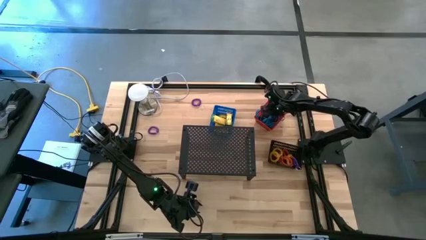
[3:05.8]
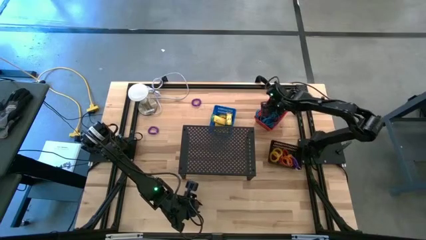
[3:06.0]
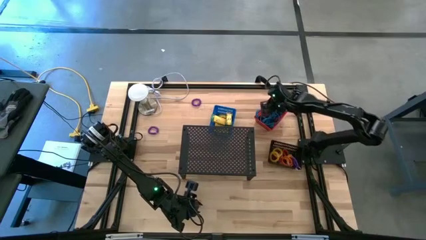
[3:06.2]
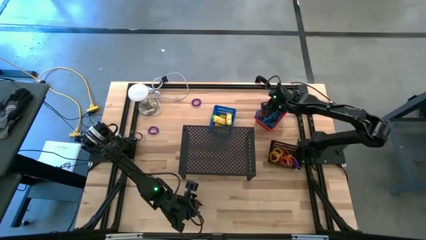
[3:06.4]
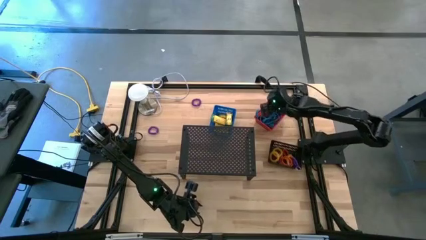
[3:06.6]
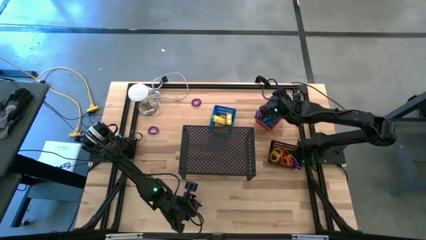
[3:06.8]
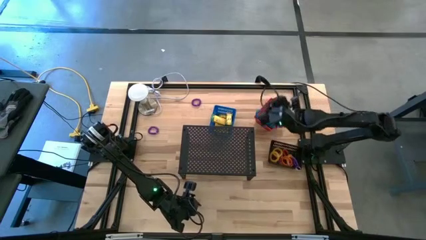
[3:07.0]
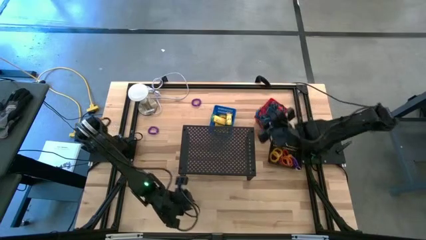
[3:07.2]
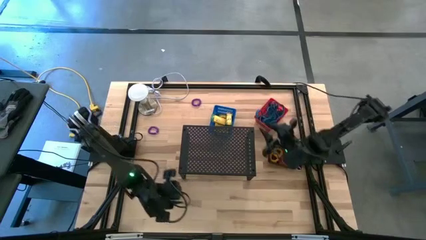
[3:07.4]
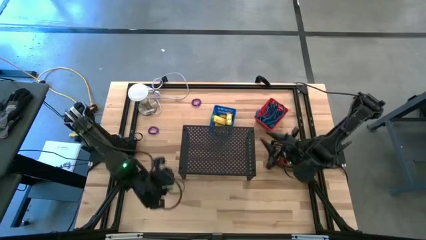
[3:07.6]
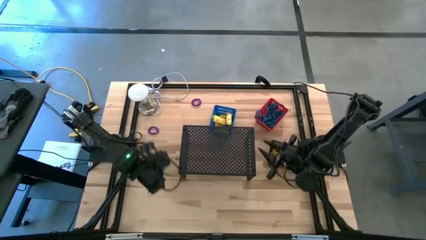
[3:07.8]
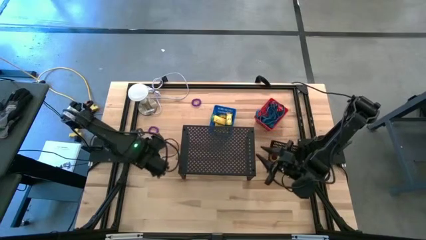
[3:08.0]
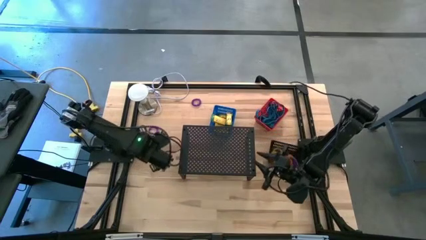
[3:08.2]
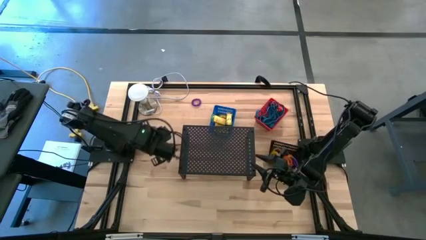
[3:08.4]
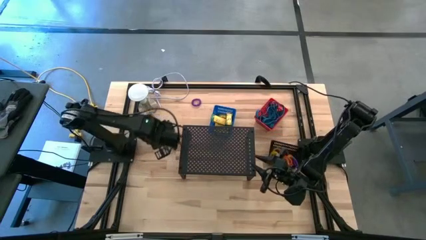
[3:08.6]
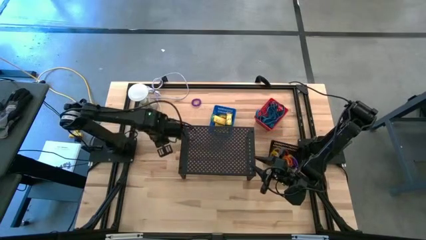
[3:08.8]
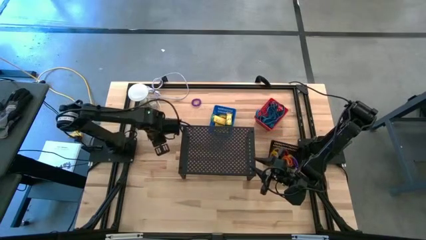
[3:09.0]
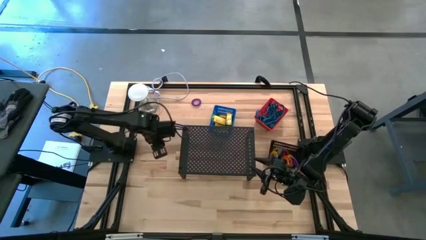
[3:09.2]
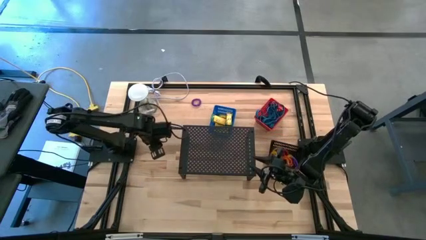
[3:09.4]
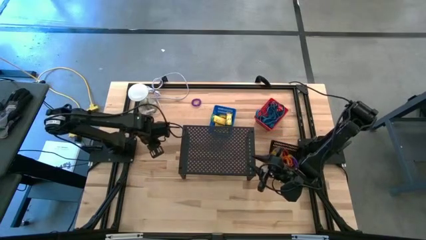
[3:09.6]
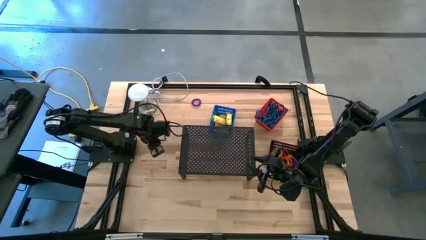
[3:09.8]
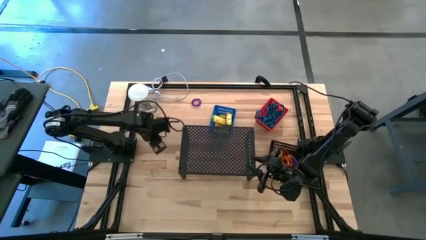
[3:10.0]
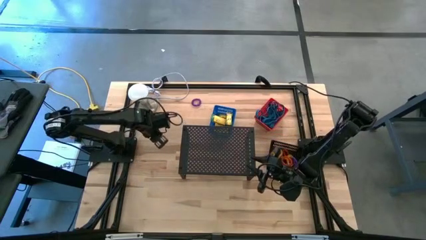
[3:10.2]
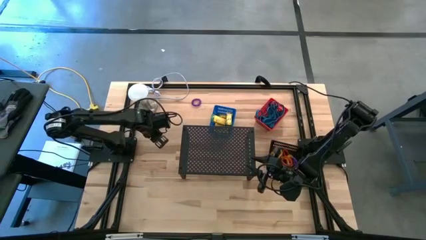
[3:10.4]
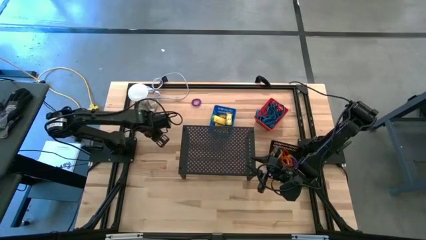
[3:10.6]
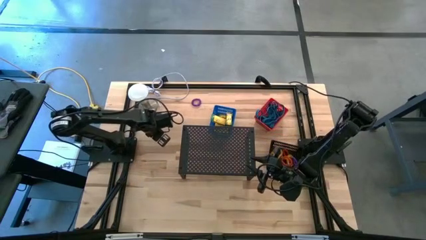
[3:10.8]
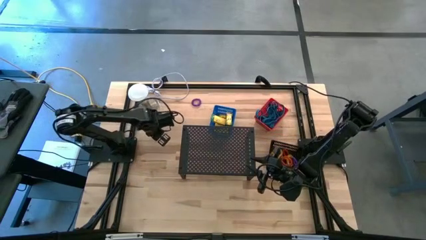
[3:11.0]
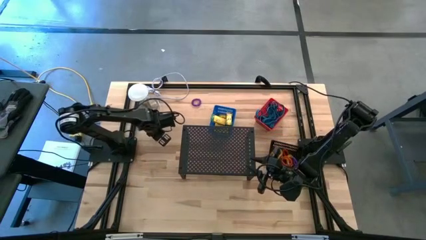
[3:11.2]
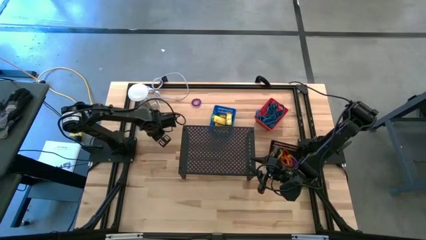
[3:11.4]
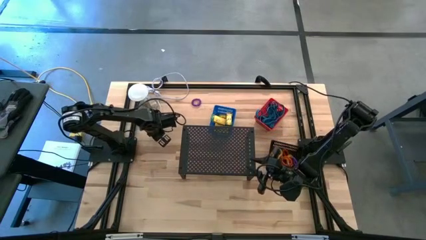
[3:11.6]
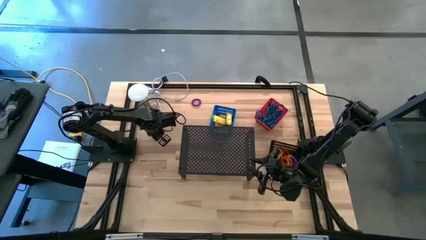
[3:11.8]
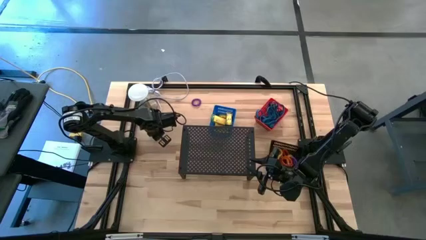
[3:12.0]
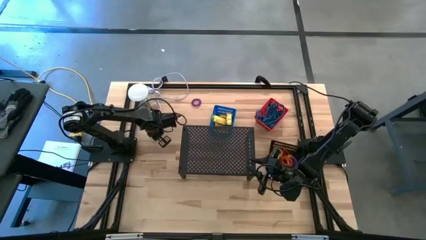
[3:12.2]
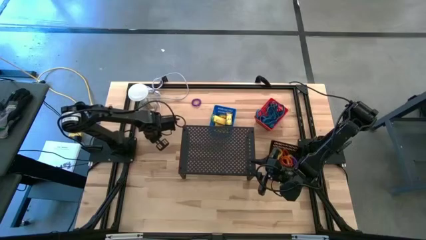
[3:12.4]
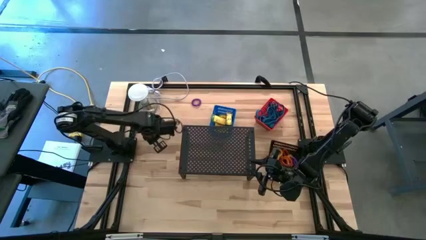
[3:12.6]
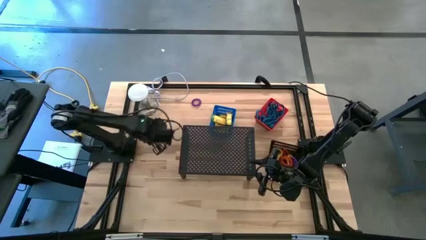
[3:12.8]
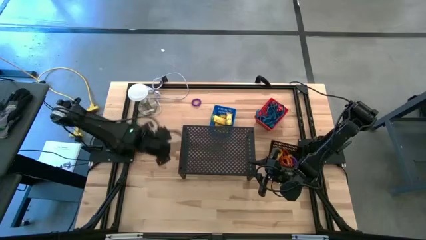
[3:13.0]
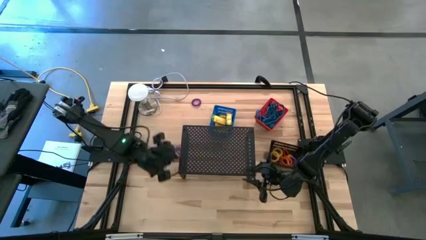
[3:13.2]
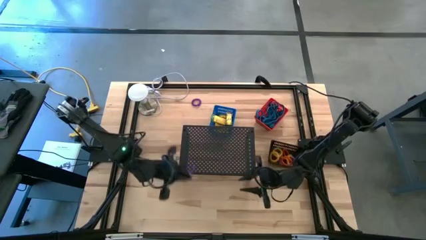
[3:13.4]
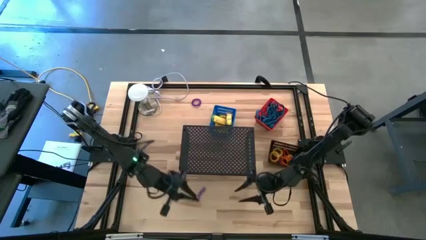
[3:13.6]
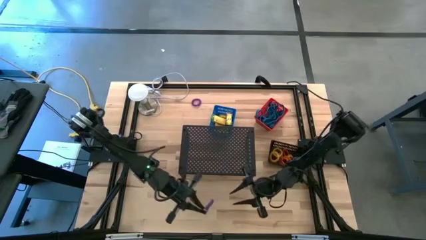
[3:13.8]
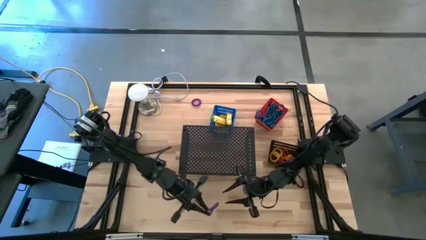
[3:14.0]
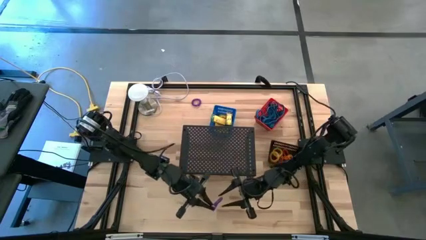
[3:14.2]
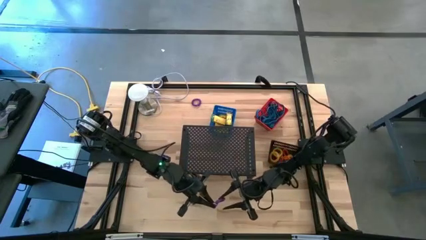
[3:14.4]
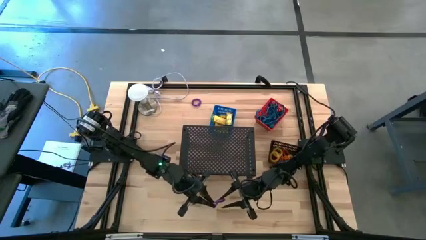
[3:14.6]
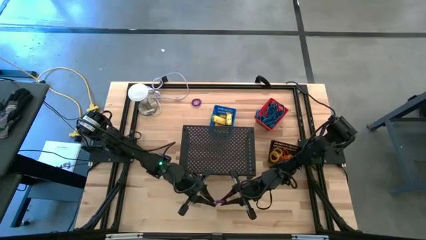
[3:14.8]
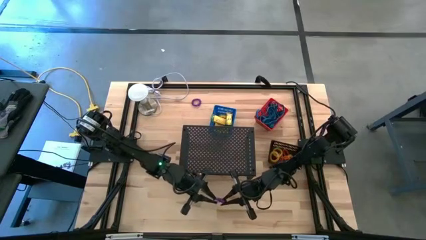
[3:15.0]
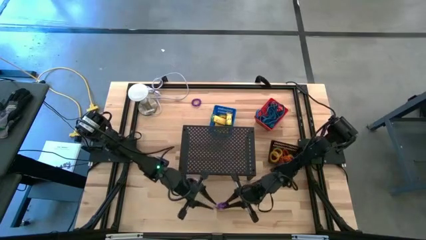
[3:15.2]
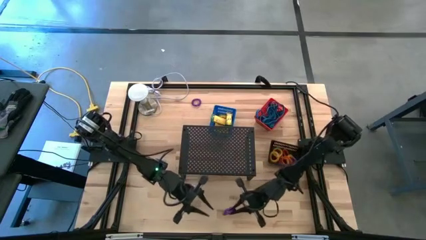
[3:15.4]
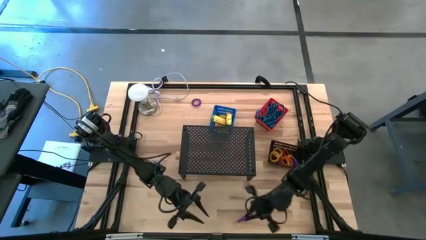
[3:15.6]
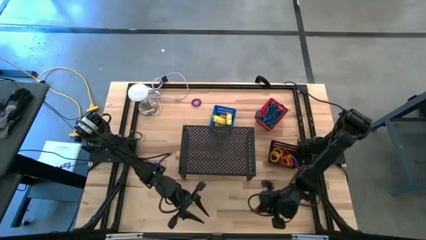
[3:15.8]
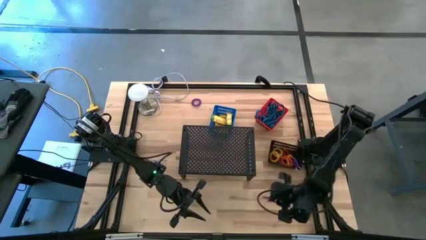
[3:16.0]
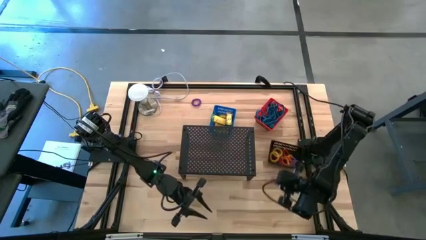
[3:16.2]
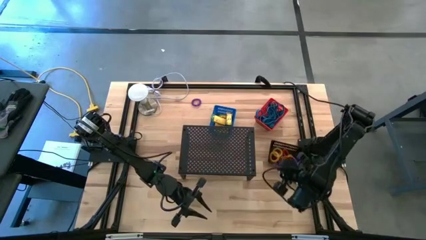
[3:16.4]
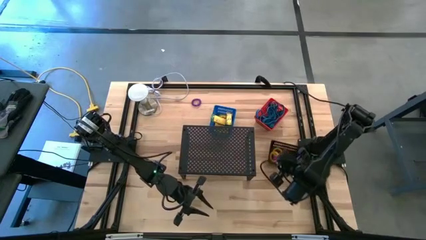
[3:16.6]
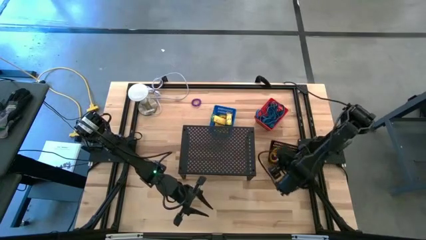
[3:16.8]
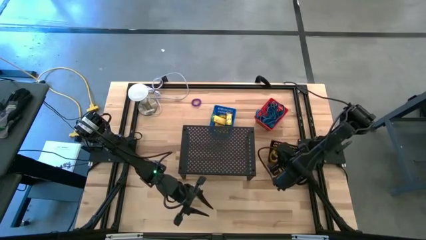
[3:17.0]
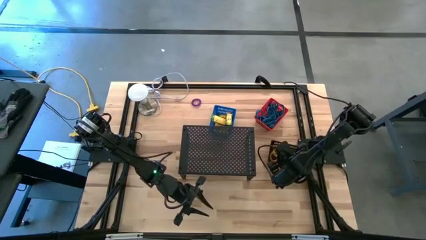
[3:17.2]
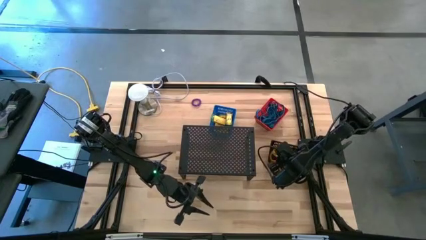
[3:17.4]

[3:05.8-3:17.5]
Task: Pick & Place Office Desk Supplies
Put the purple spiral keychain into the black bin

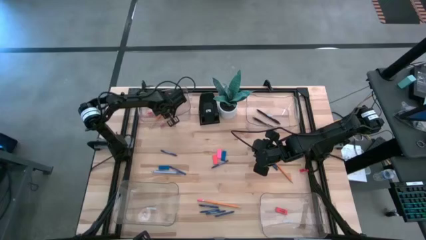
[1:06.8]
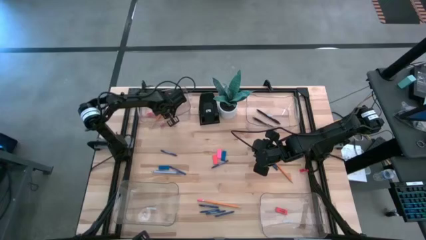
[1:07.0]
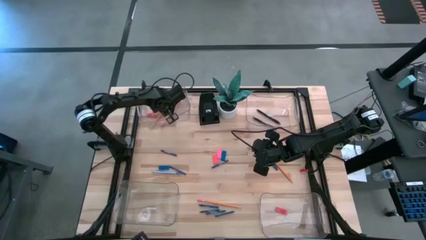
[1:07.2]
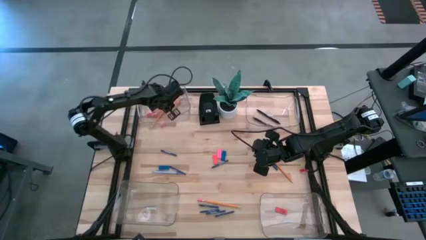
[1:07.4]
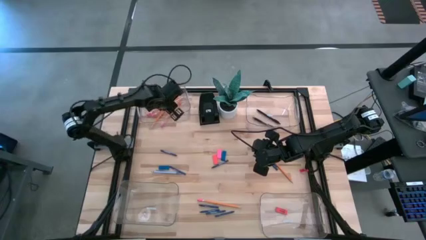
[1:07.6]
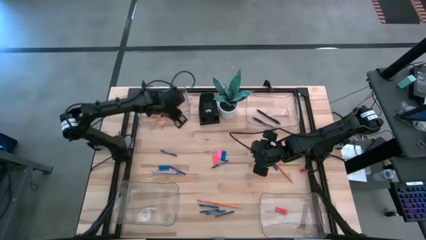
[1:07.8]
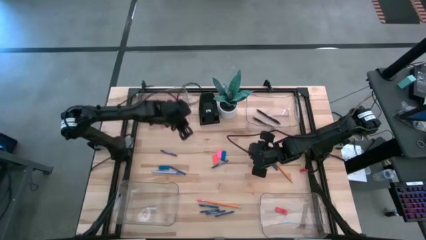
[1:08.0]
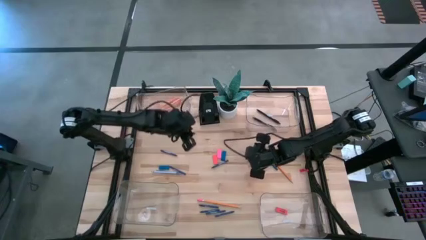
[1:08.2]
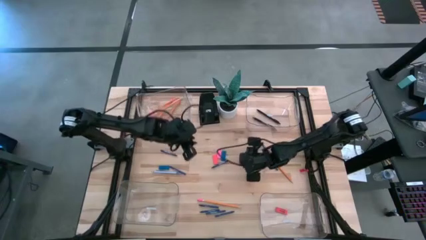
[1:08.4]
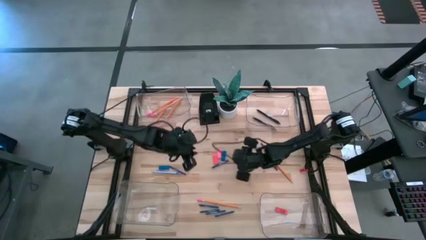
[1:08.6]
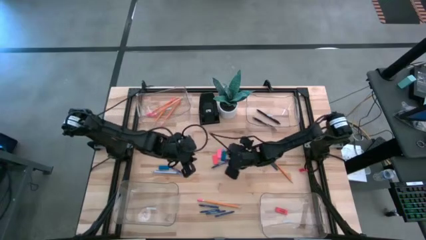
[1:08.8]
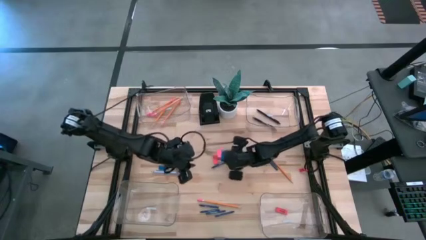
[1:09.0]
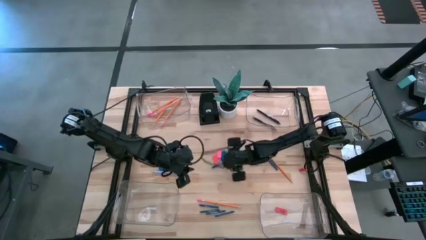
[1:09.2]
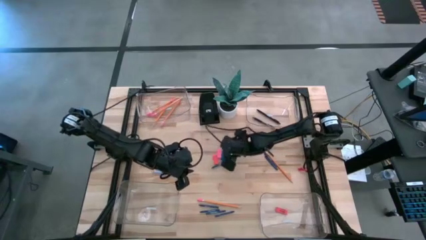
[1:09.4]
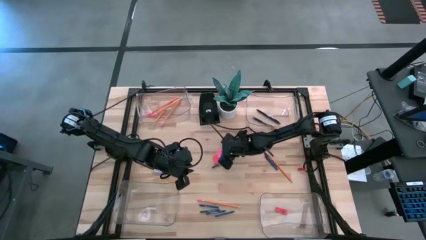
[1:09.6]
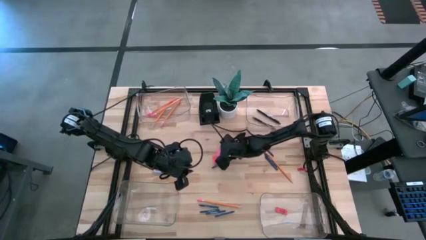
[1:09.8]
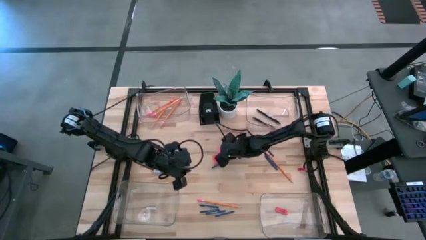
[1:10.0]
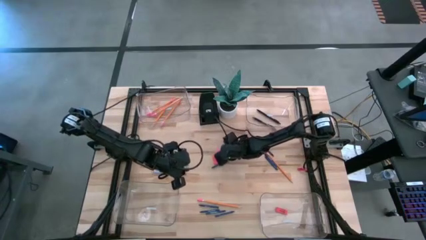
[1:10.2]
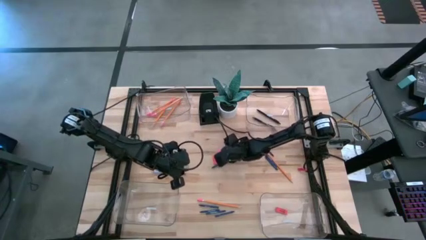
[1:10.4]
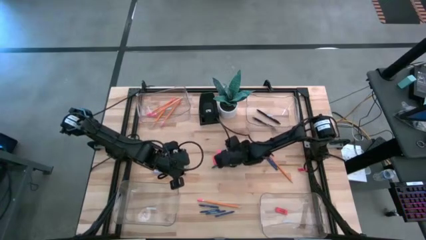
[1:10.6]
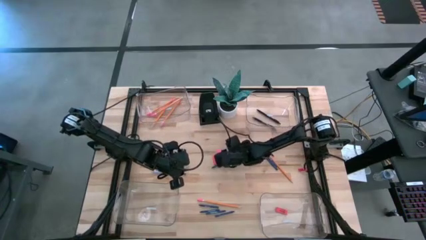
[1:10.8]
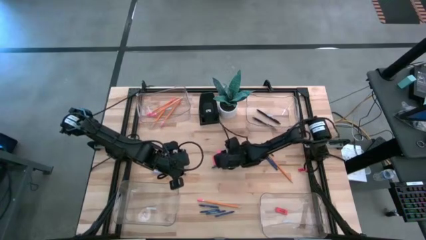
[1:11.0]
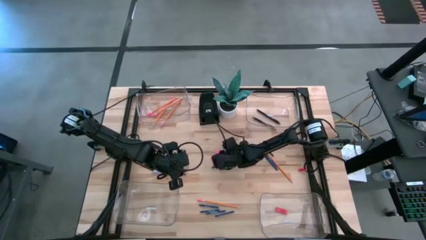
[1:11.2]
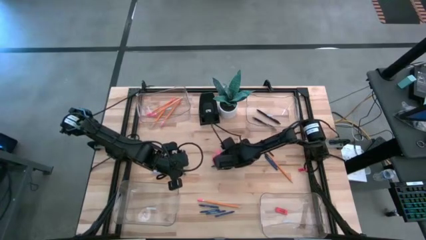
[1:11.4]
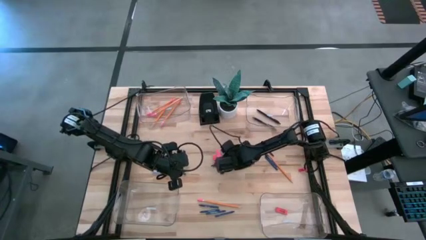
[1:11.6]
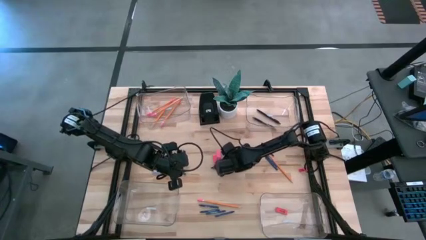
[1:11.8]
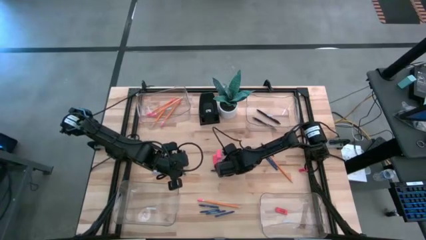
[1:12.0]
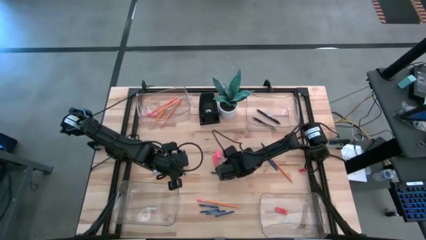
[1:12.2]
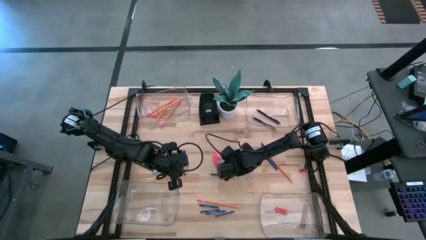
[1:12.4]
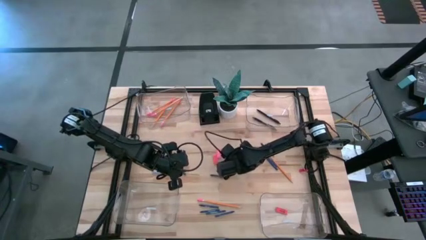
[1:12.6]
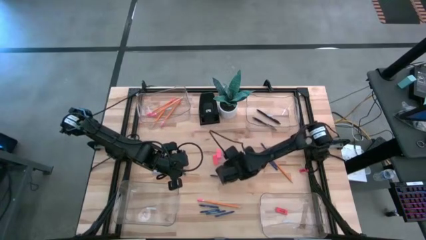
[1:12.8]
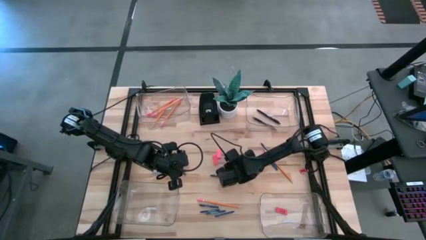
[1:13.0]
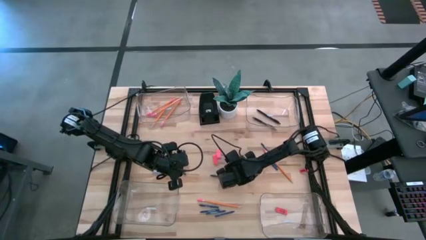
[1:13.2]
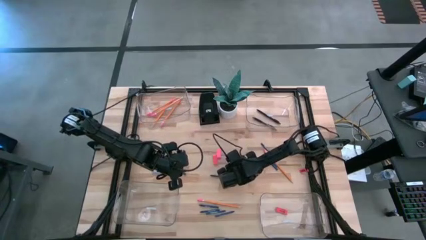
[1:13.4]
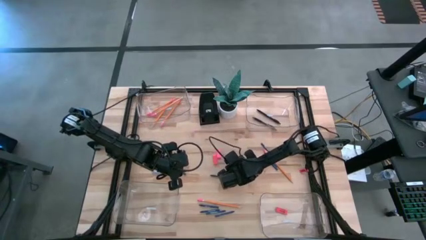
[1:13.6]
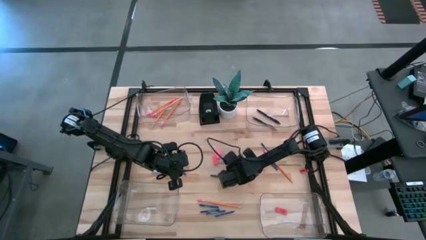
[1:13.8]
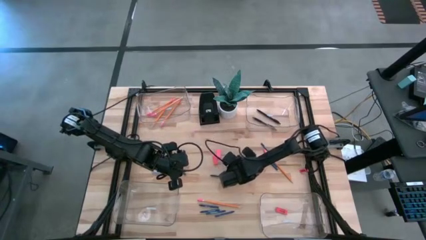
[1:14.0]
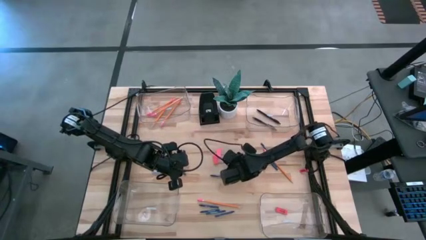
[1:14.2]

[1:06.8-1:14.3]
Task: Sort crayons/erasers/pens/pencils in bins
Put the blue eraser into the bottom right transparent bin
